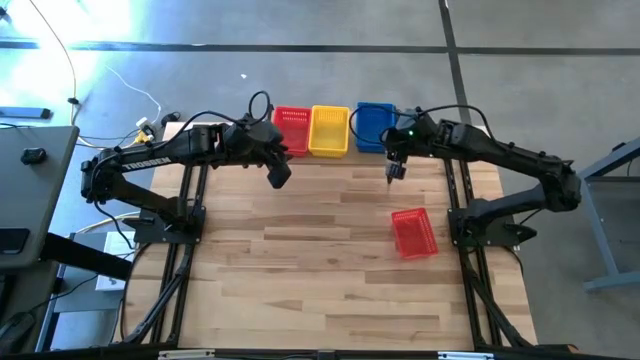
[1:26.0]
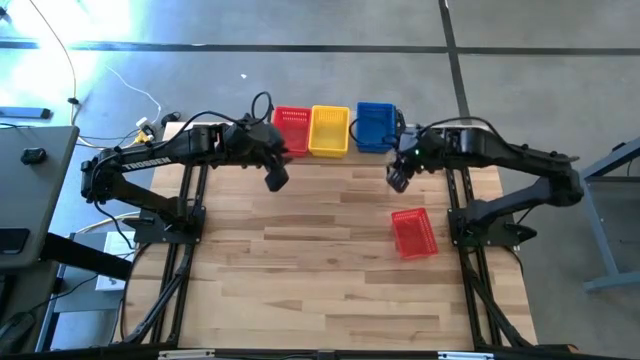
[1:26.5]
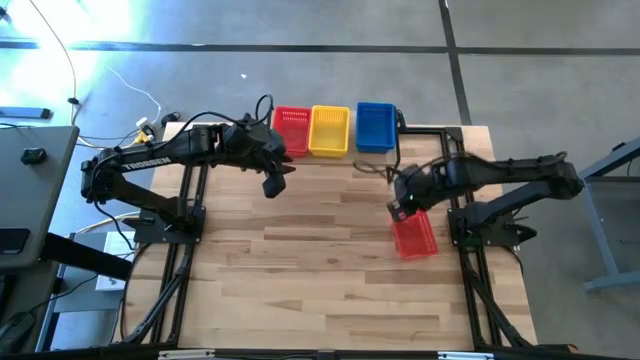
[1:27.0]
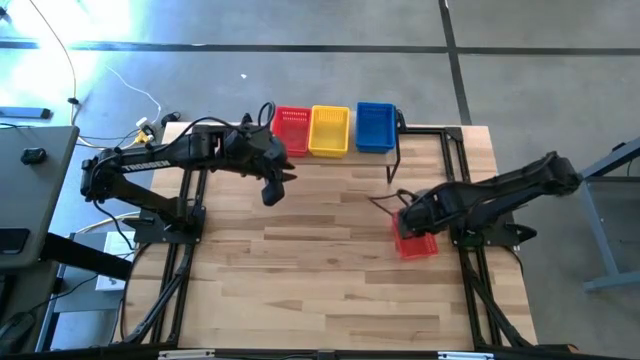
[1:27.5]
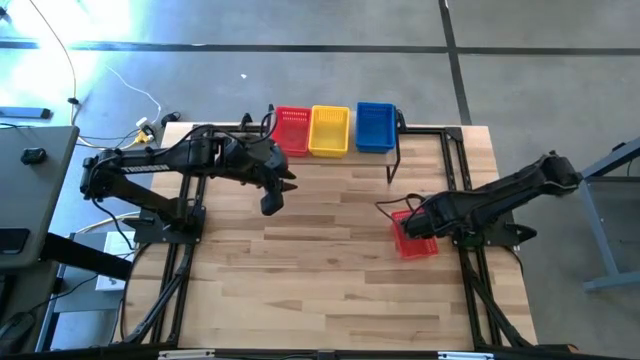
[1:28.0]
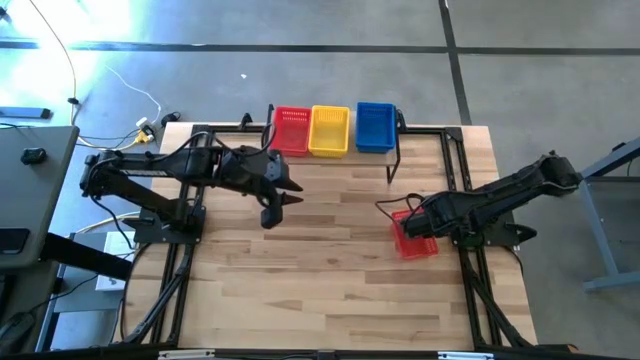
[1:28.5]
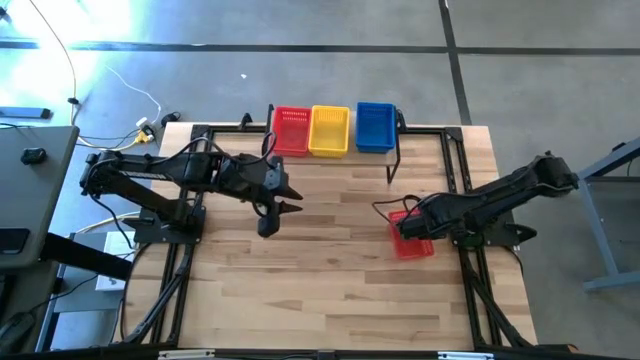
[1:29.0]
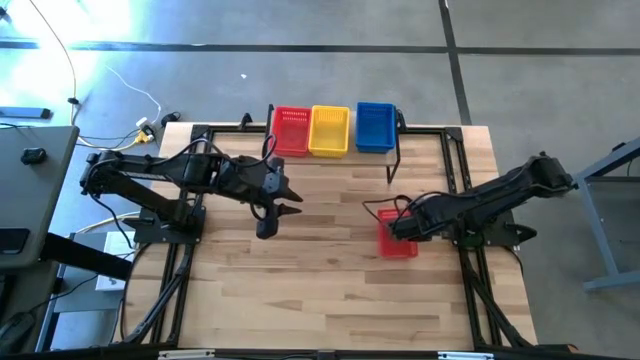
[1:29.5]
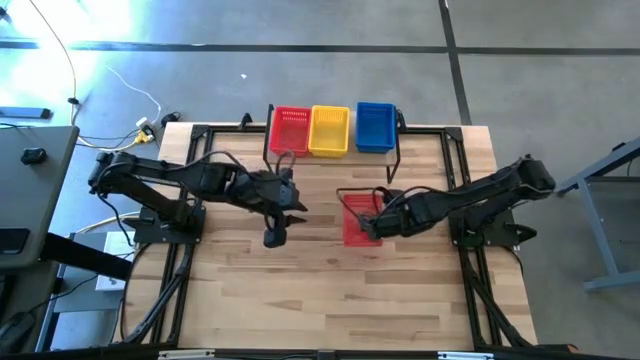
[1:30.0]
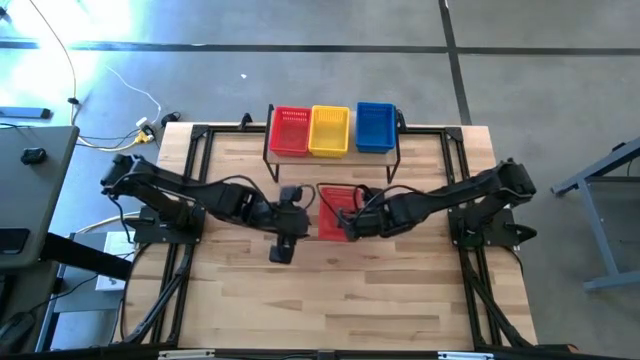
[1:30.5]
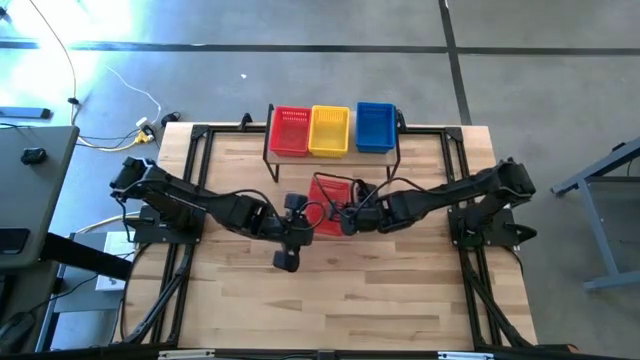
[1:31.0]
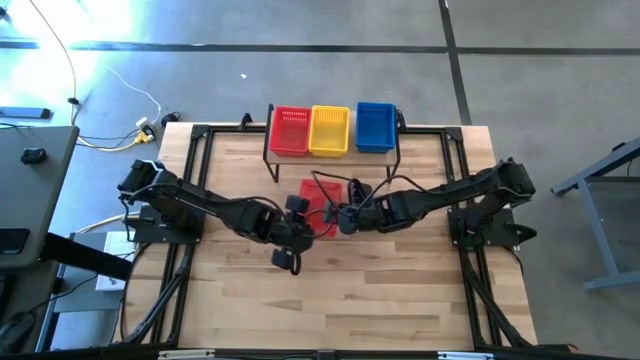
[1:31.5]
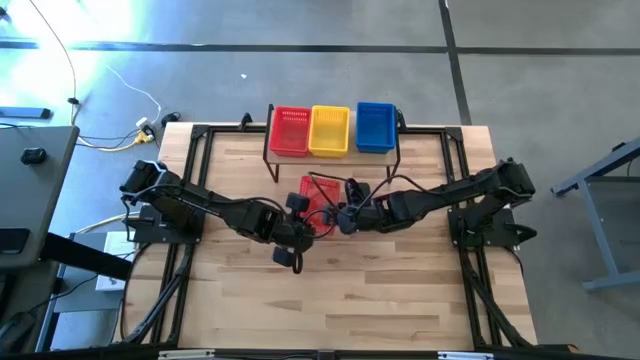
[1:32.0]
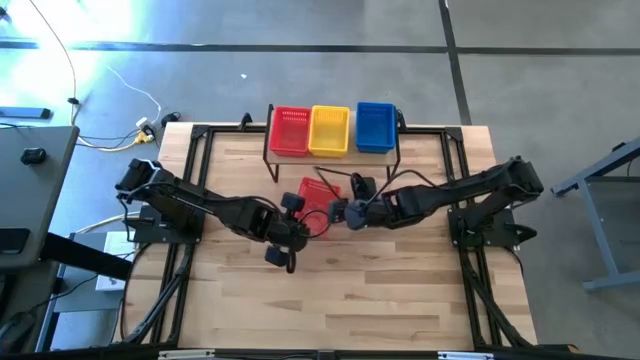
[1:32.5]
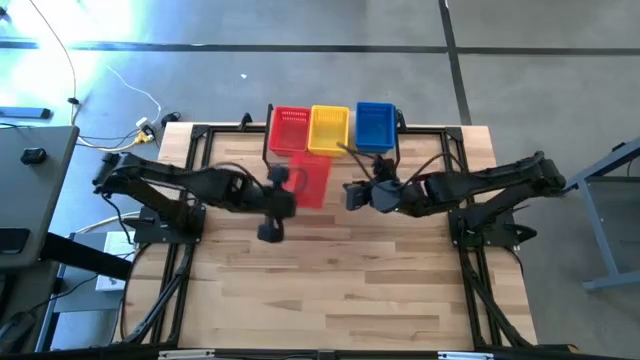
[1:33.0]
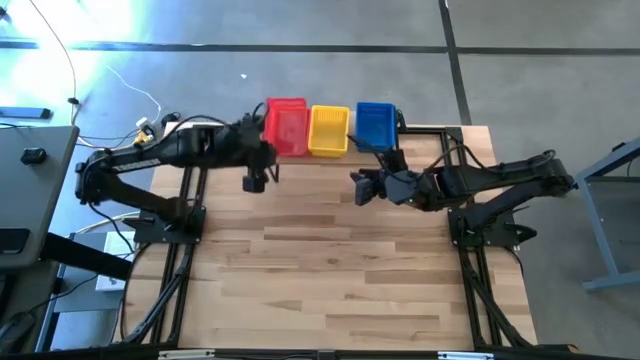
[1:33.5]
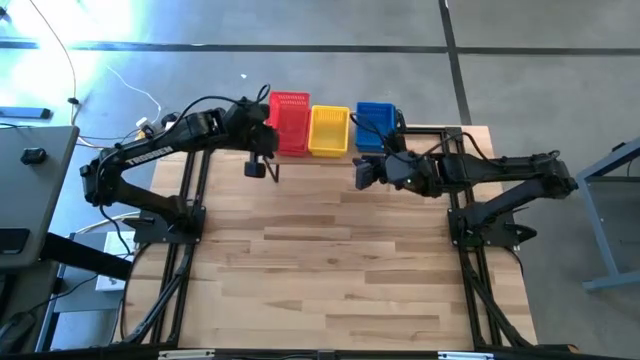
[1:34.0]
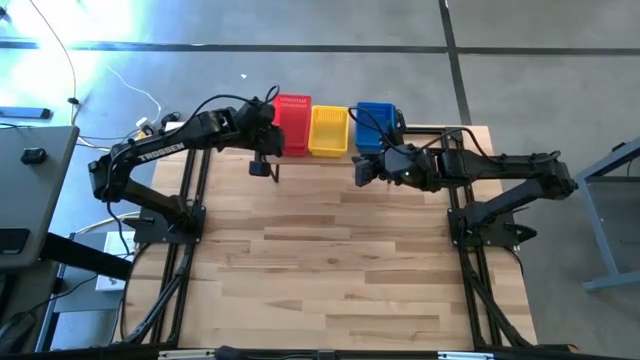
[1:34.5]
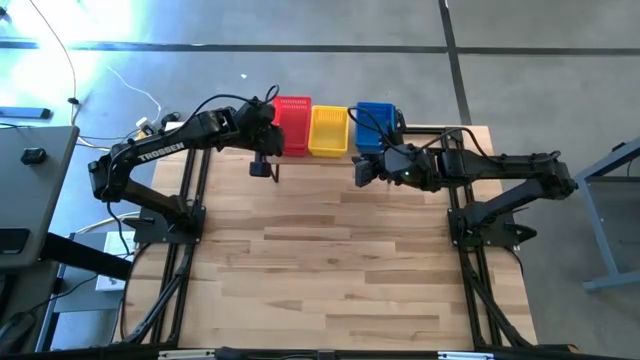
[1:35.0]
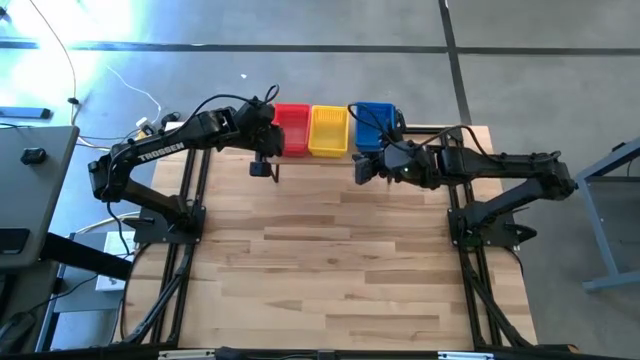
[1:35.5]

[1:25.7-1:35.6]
Task: Stack baskets on shelf by color
Stack the red bin on the stacked red bins on the shelf

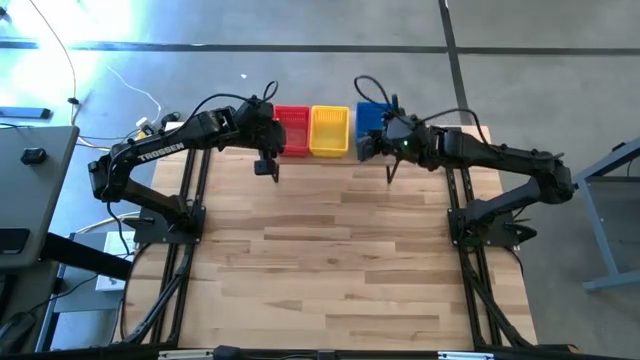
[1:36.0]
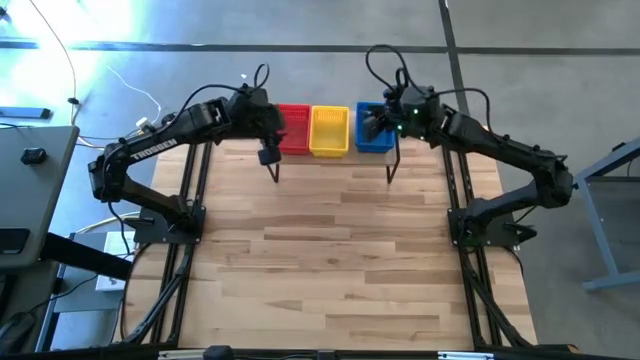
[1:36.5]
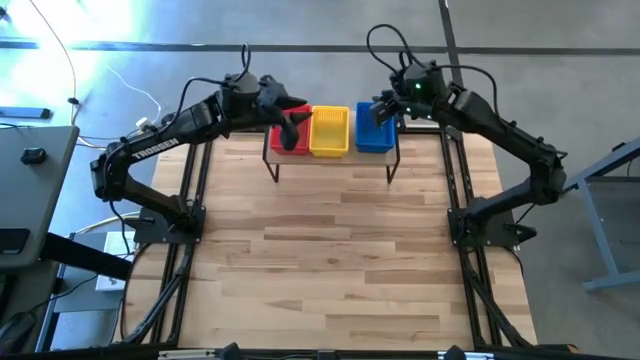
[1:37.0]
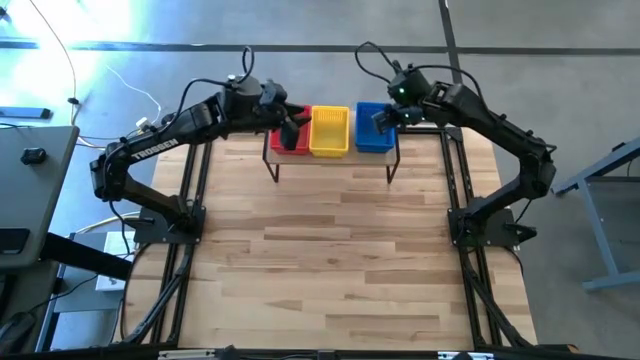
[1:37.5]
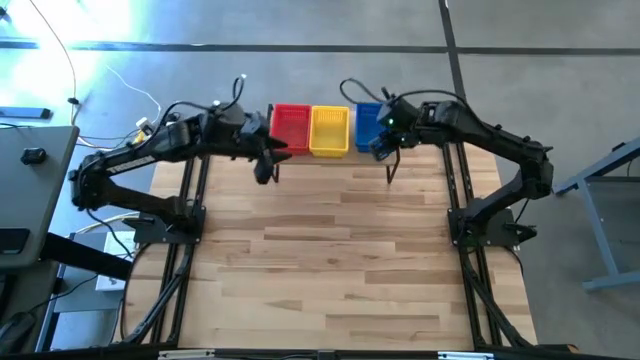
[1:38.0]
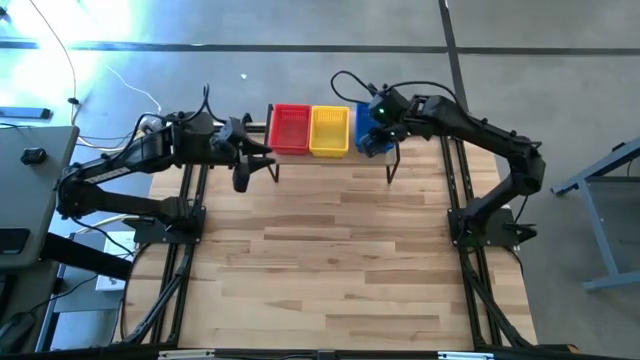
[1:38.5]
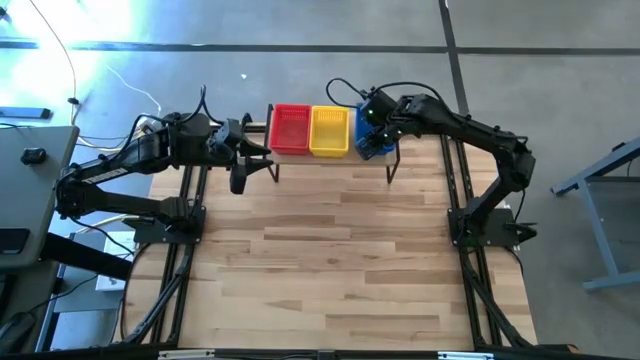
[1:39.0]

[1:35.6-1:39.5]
Adjust the blue bins

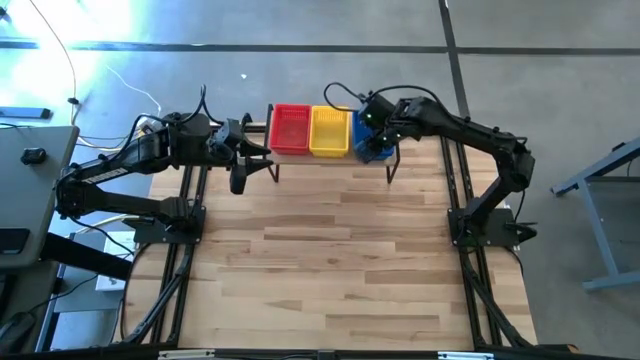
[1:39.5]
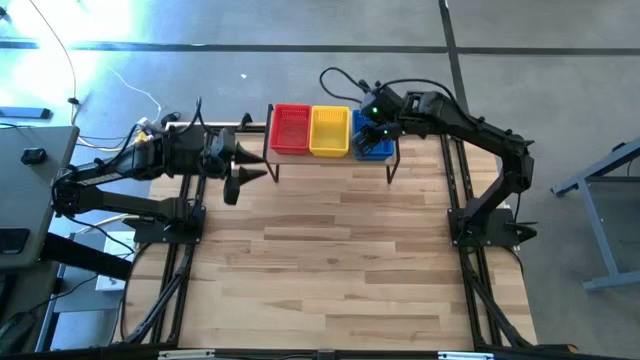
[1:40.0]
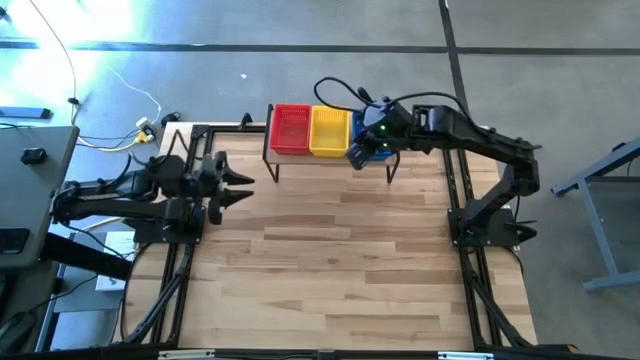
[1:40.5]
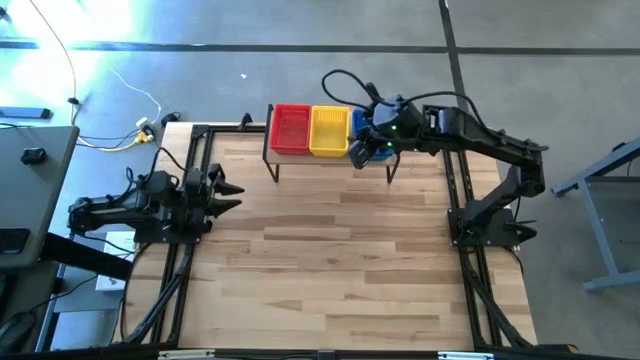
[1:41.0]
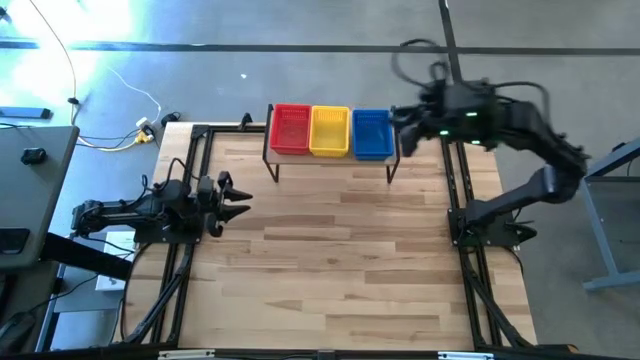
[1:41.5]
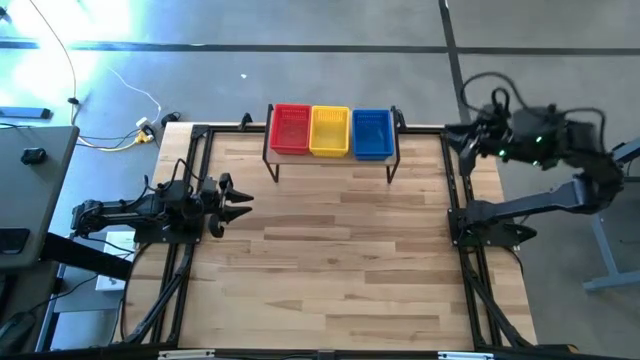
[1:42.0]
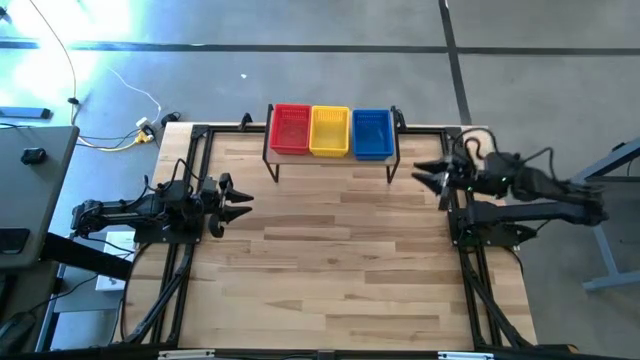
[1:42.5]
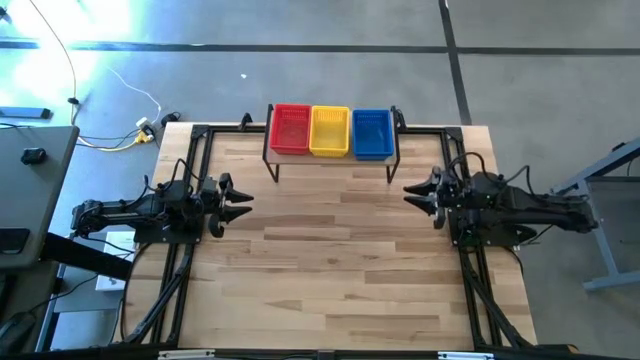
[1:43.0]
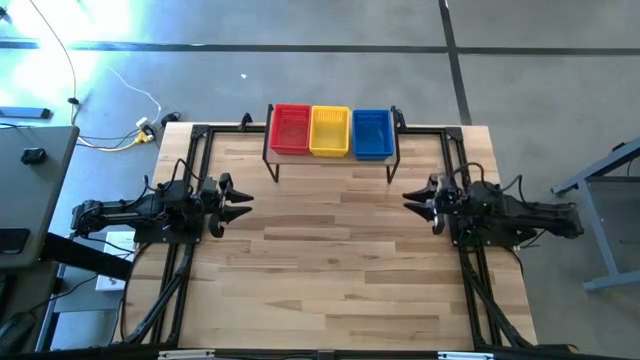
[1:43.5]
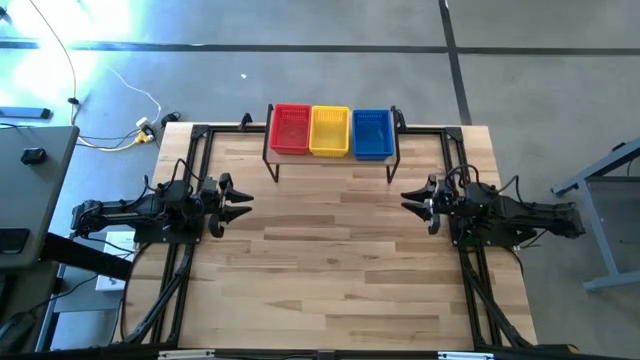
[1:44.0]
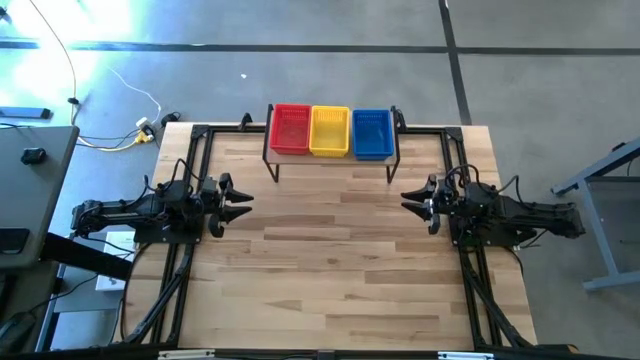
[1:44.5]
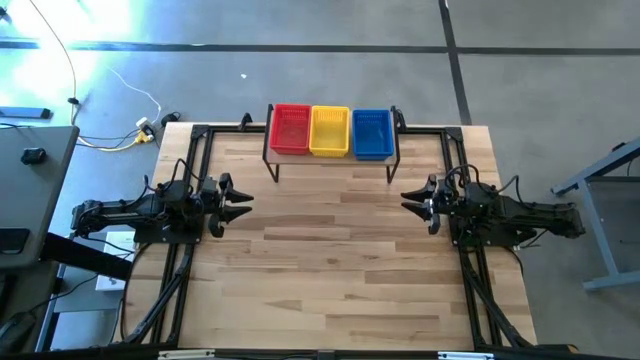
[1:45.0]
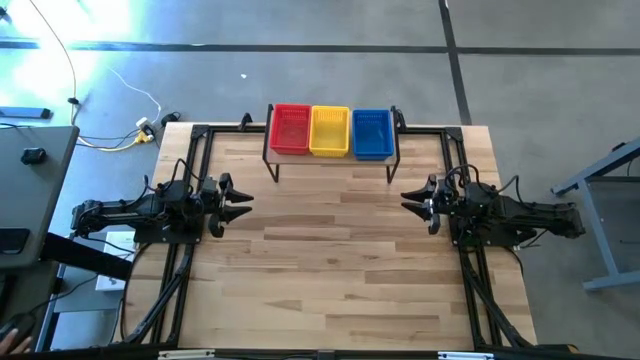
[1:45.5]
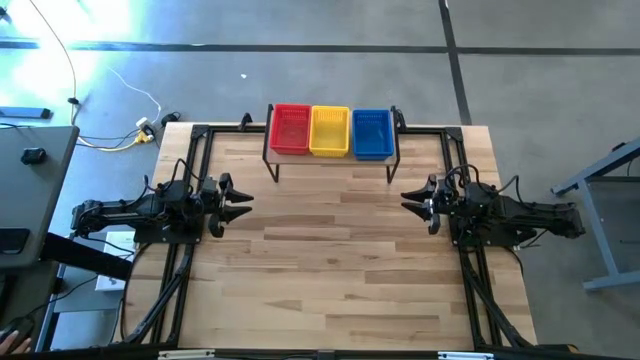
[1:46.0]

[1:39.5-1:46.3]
Return to Home Position
